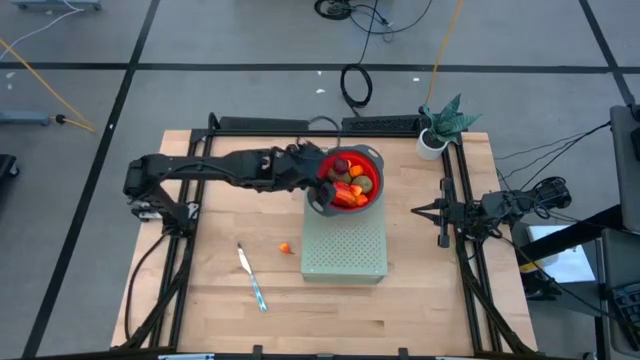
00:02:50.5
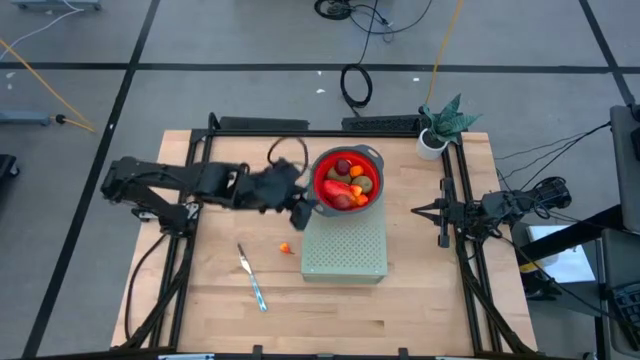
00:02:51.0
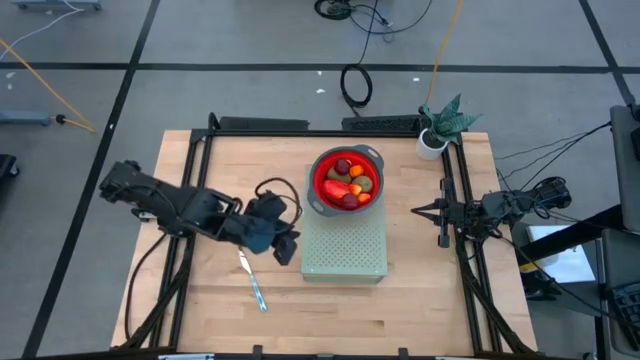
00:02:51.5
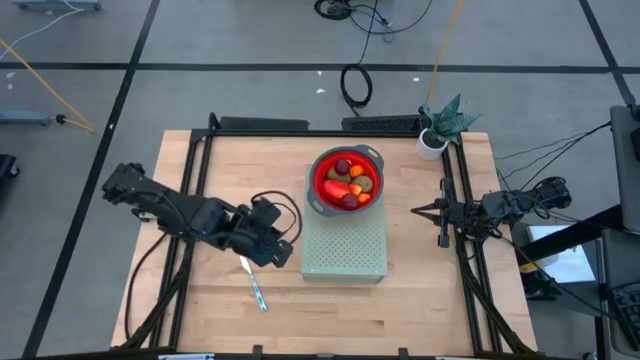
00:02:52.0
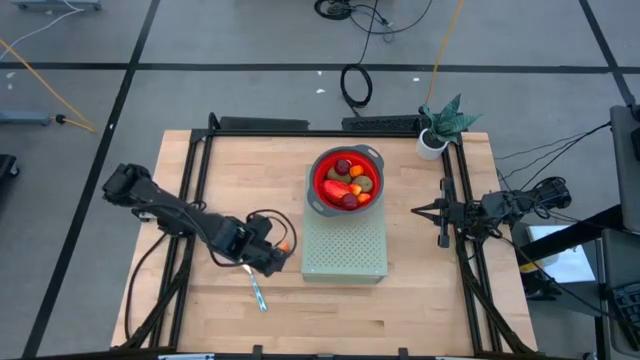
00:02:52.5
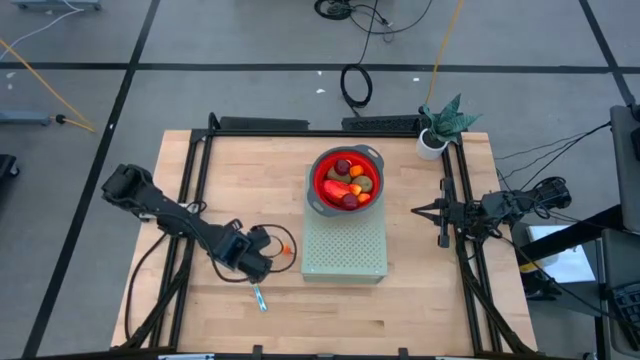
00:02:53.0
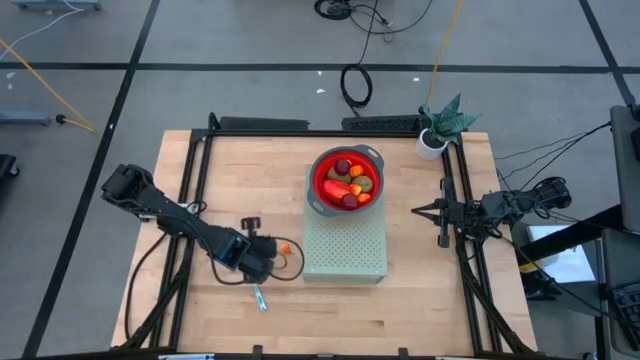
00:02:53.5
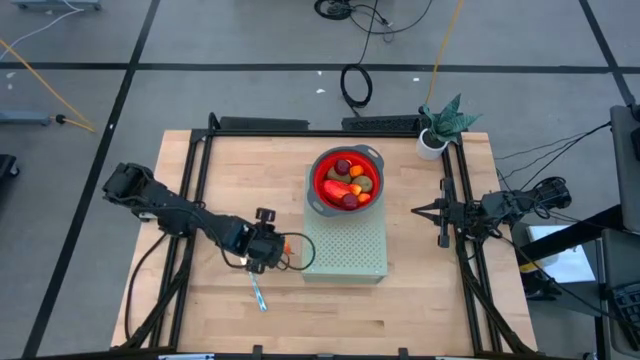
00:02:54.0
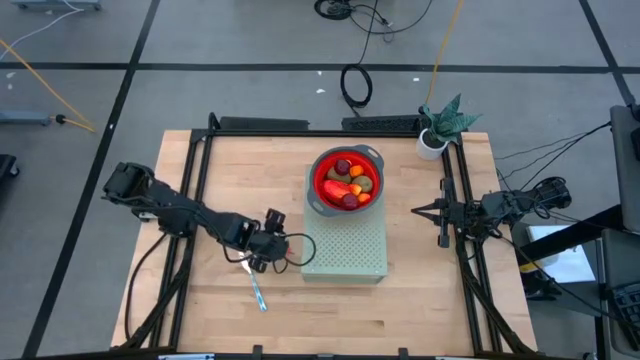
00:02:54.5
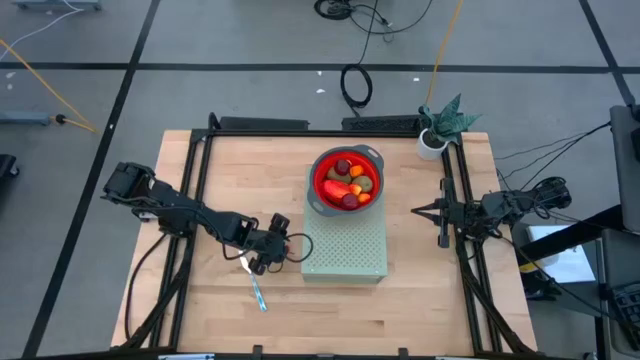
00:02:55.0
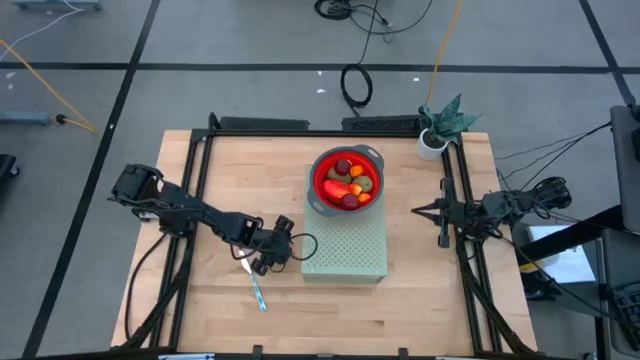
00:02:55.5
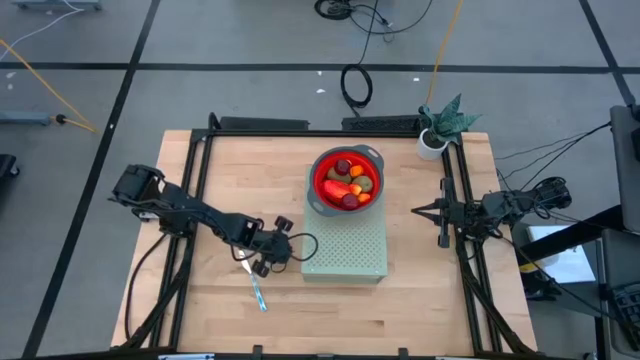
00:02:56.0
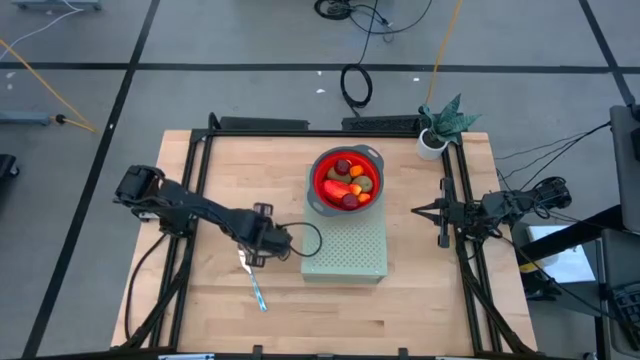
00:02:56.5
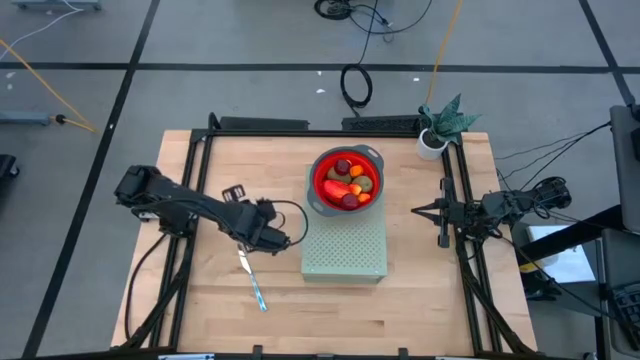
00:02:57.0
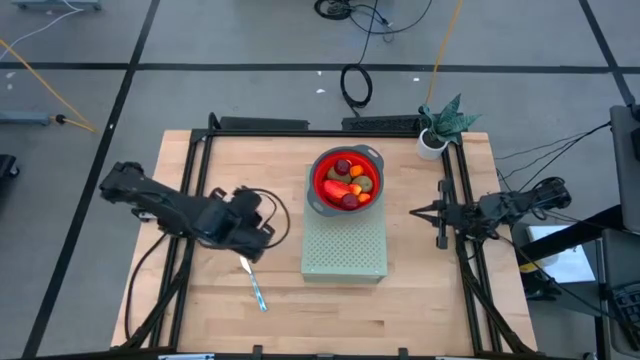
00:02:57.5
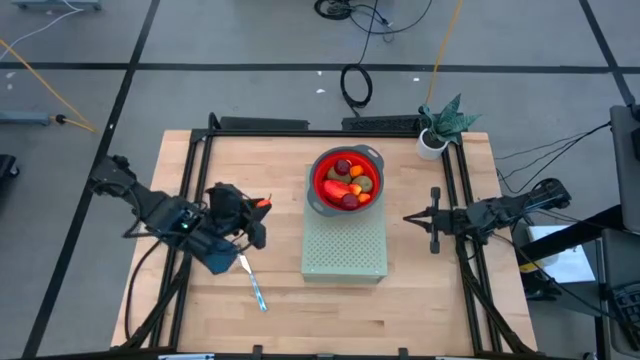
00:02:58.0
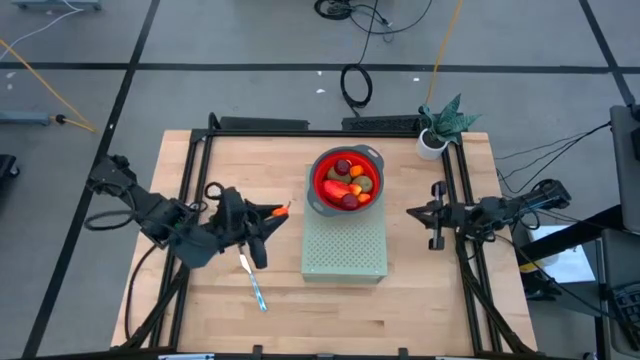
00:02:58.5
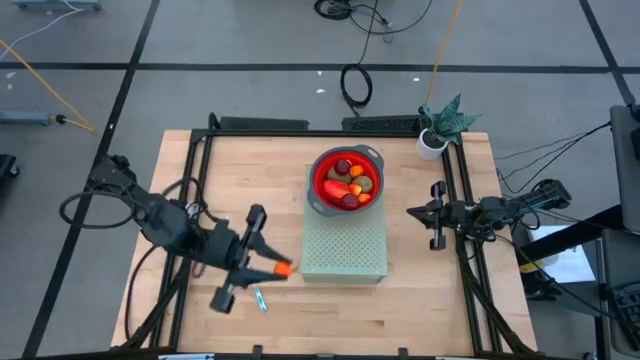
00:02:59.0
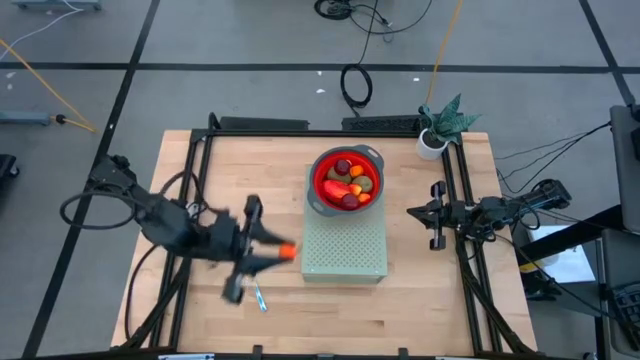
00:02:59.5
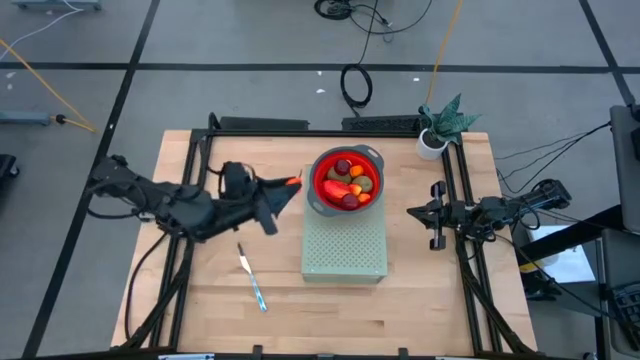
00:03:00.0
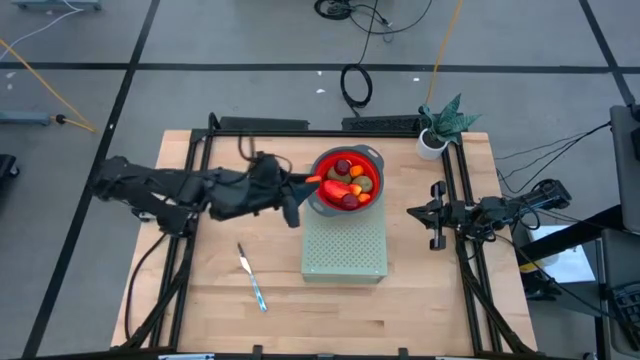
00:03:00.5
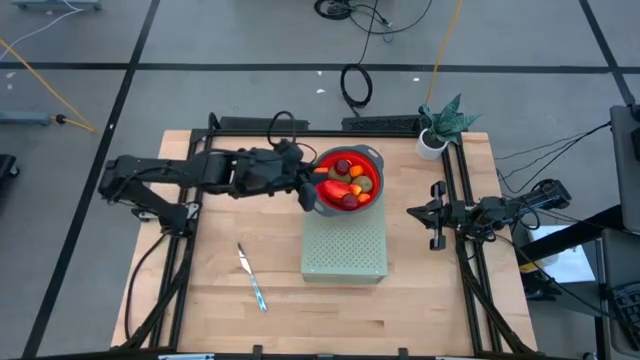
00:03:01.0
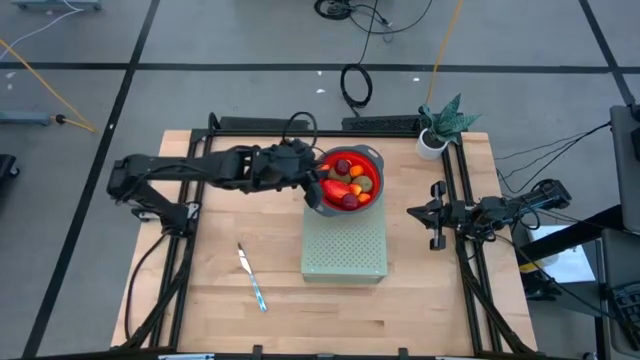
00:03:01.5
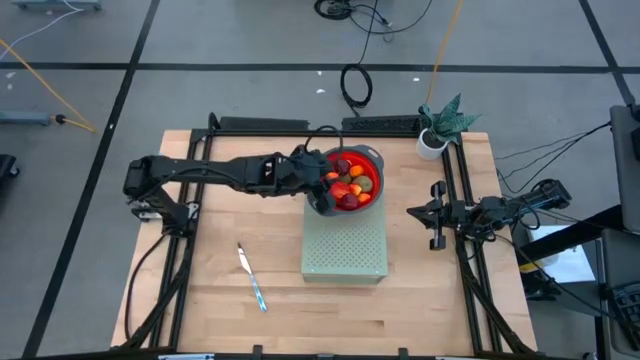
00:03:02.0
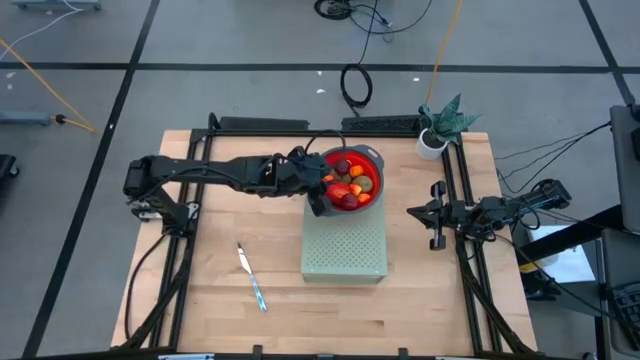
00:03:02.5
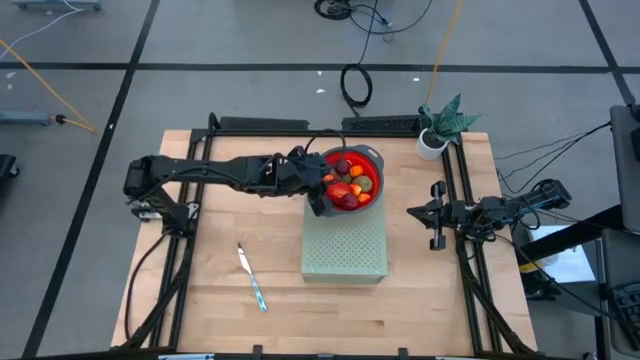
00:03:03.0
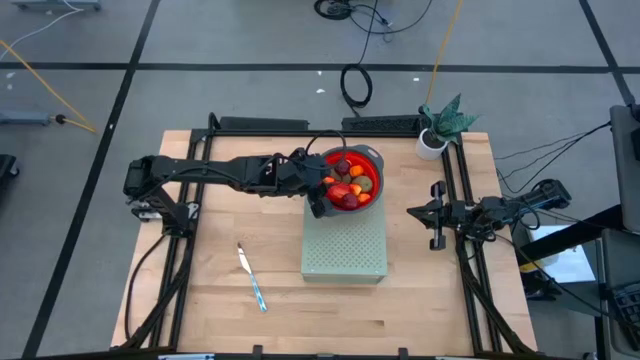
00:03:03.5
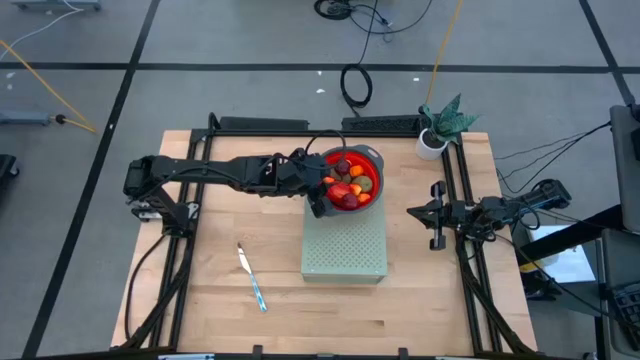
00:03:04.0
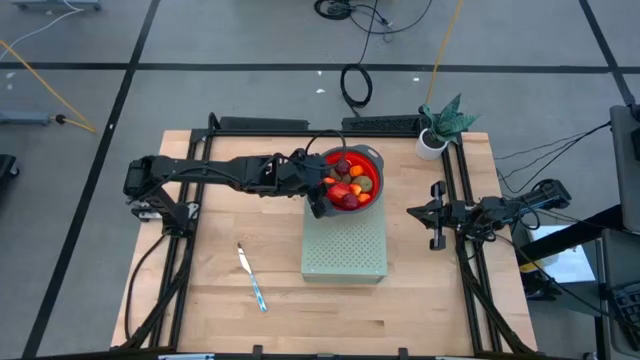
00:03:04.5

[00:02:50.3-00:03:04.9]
Task: Pick & Place Fruit
Put the peach into the red strainer bowl on the shelf

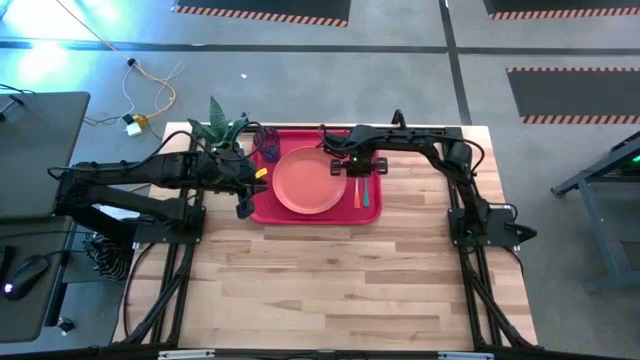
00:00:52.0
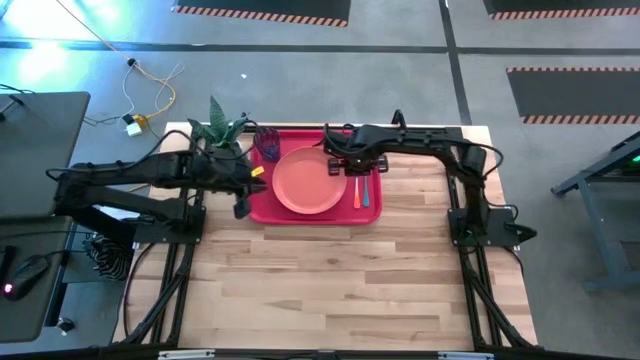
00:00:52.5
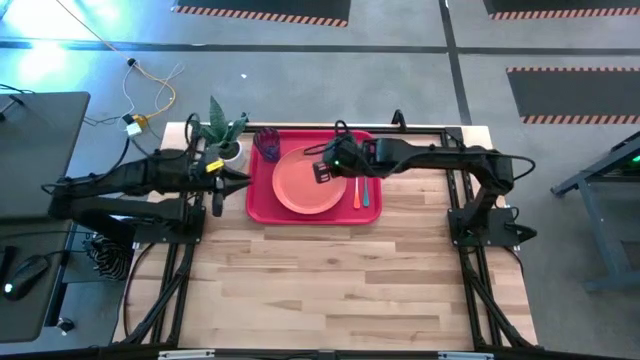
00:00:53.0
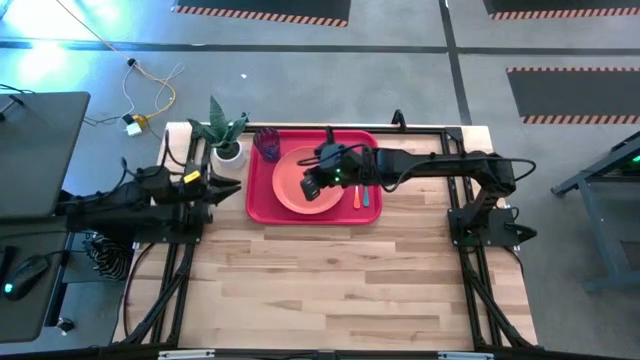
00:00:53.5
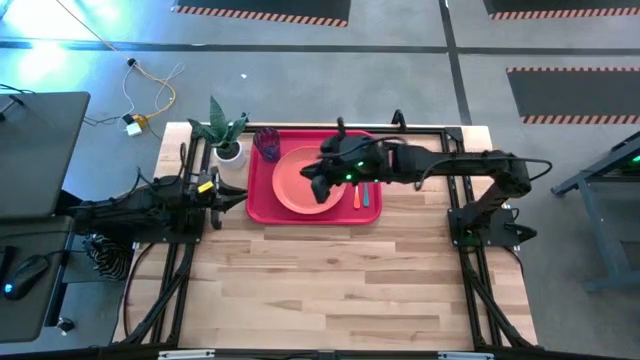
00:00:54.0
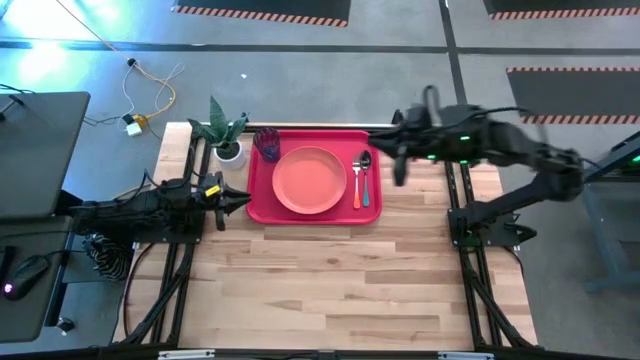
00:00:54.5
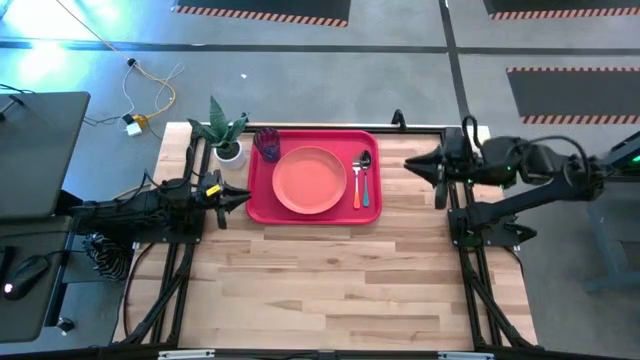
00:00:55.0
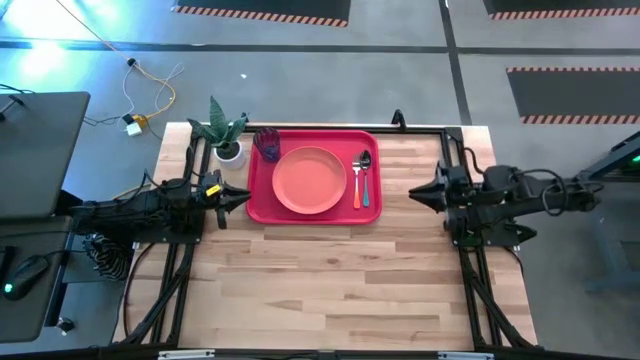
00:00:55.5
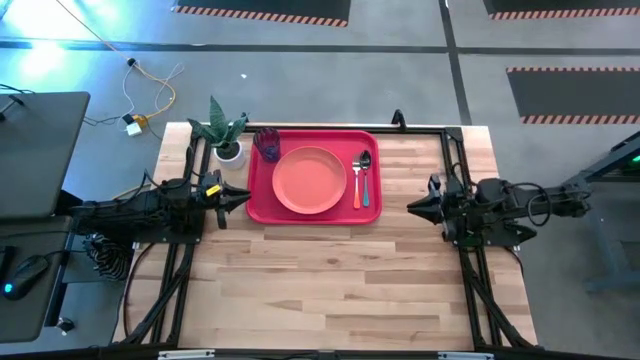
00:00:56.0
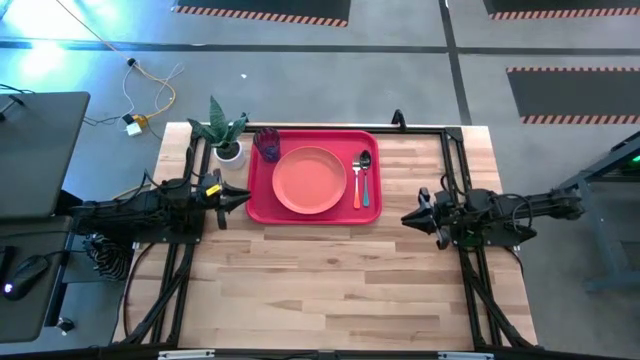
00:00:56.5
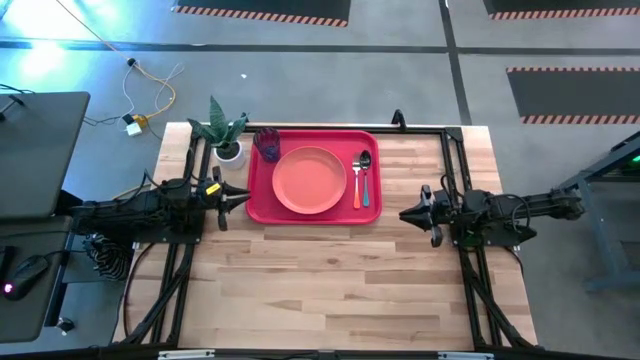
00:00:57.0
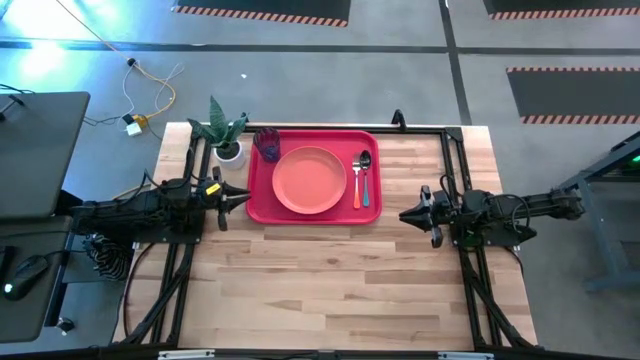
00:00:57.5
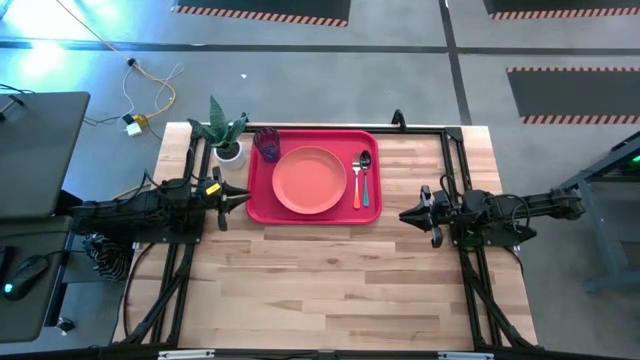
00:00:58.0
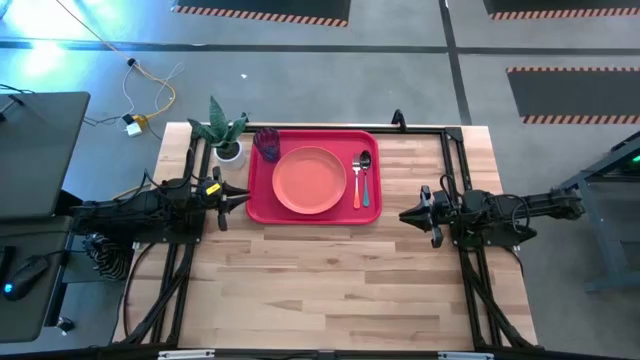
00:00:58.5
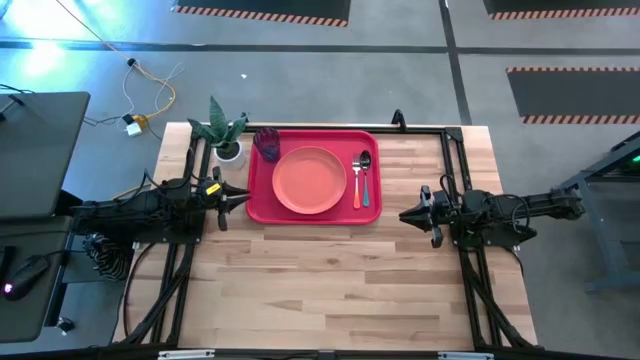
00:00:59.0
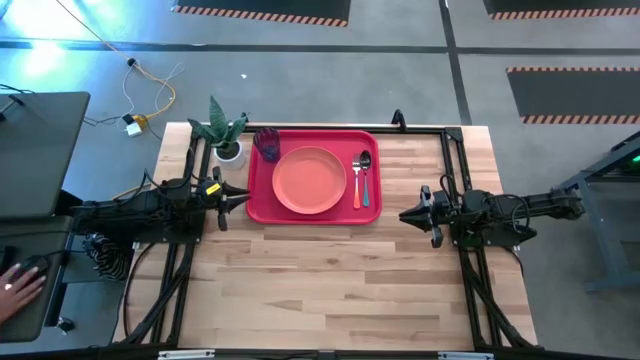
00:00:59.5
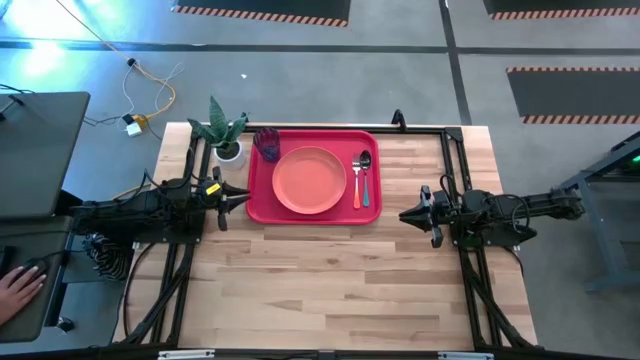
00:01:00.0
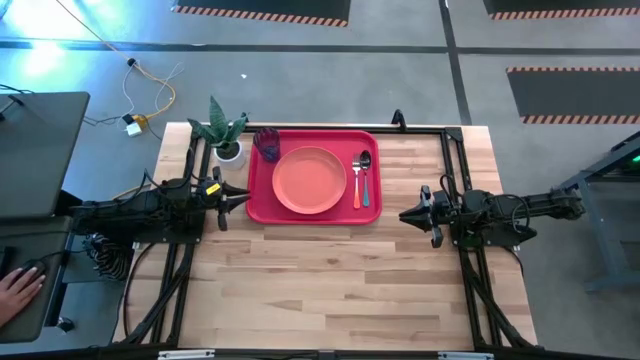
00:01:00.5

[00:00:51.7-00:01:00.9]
Task: Pick and place plate/cup/fork/spoon on tray
Return to Home Position
